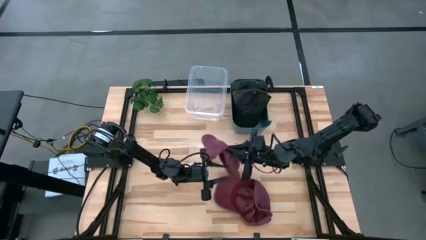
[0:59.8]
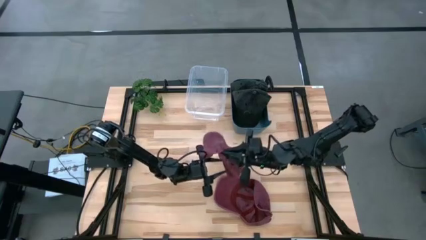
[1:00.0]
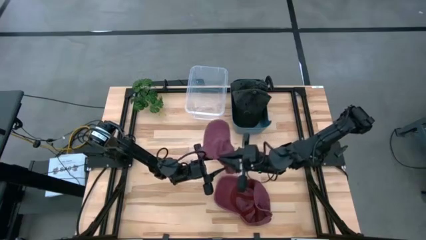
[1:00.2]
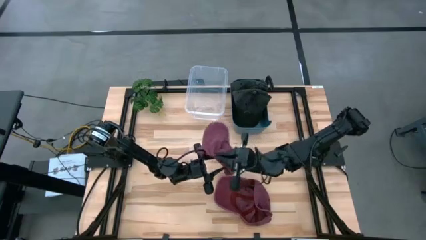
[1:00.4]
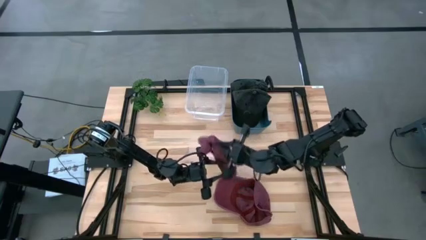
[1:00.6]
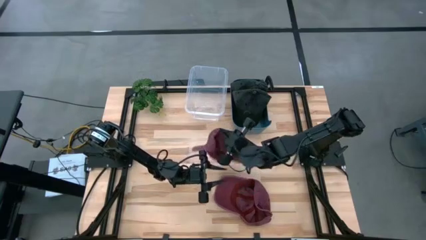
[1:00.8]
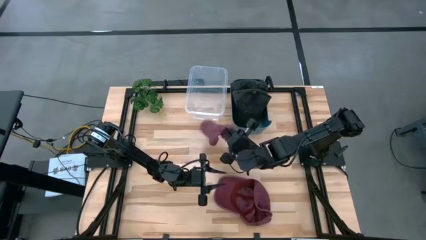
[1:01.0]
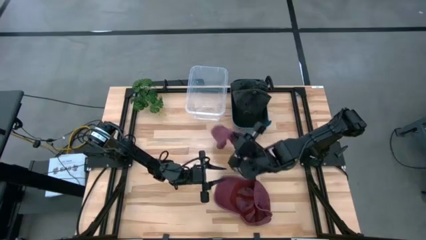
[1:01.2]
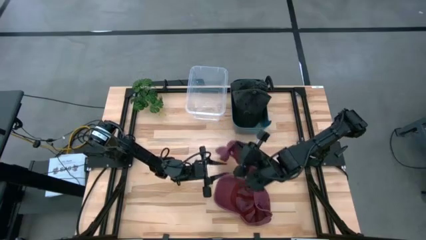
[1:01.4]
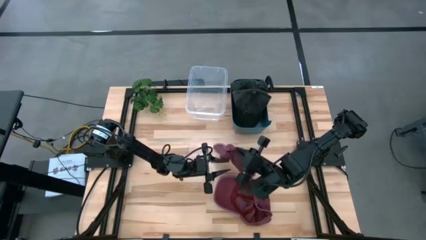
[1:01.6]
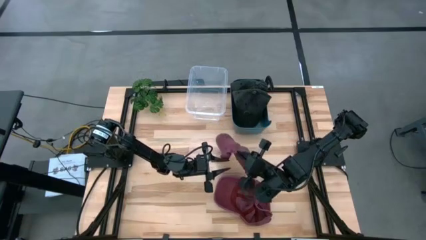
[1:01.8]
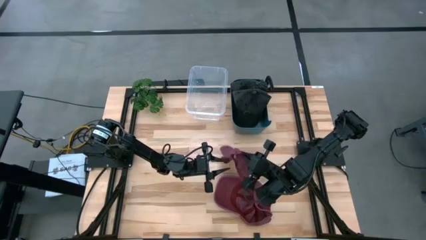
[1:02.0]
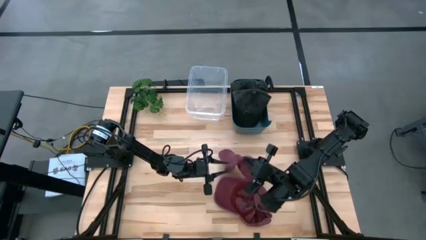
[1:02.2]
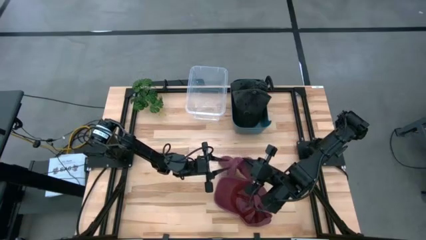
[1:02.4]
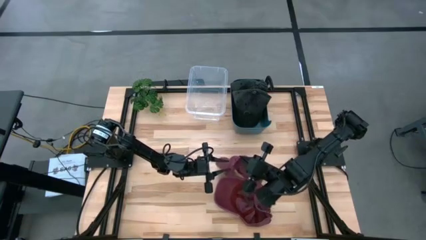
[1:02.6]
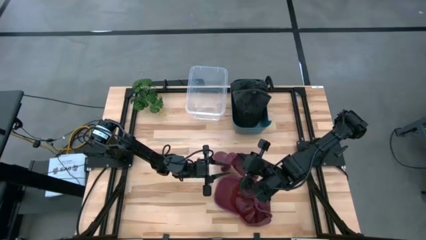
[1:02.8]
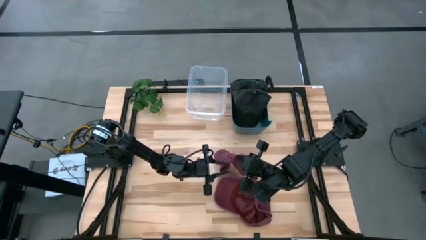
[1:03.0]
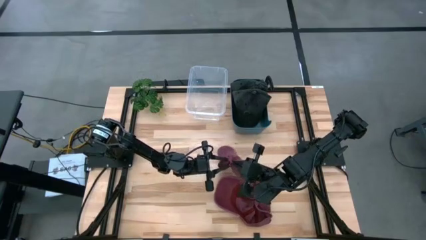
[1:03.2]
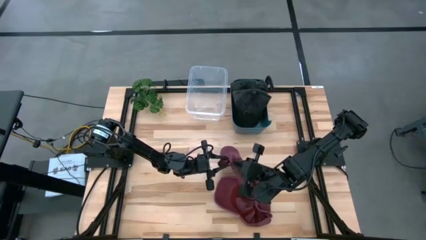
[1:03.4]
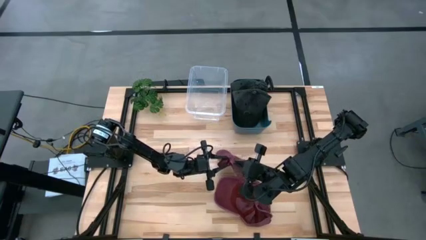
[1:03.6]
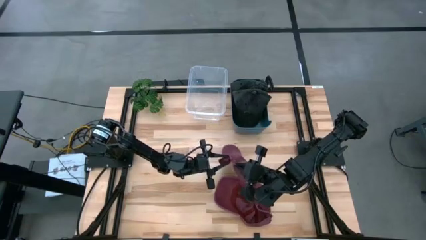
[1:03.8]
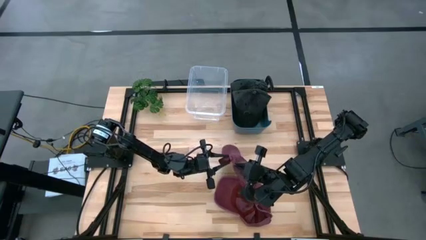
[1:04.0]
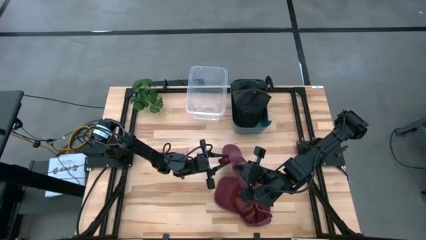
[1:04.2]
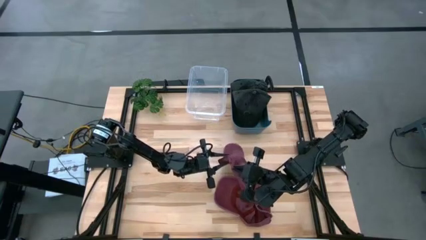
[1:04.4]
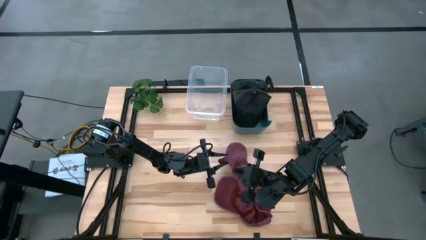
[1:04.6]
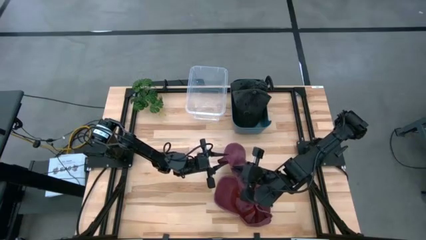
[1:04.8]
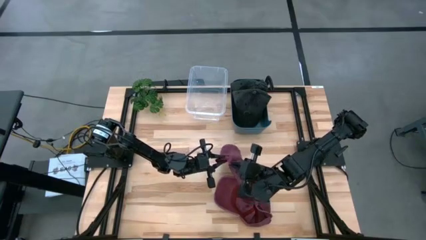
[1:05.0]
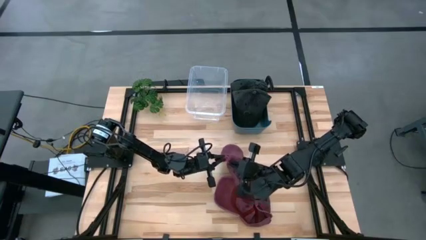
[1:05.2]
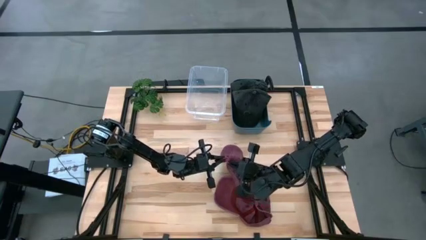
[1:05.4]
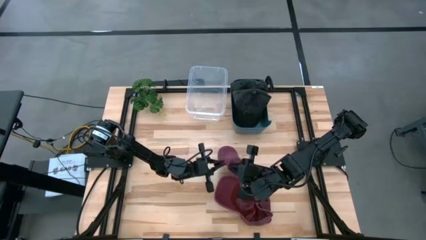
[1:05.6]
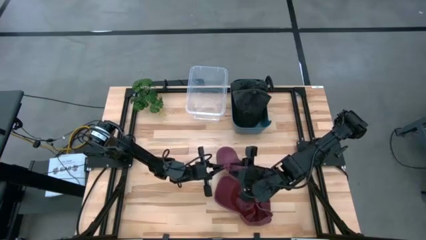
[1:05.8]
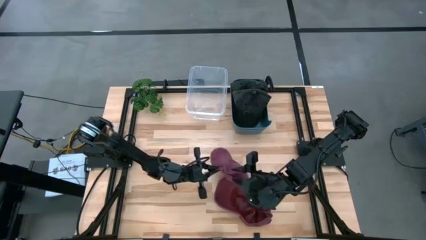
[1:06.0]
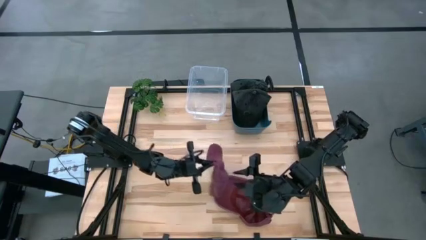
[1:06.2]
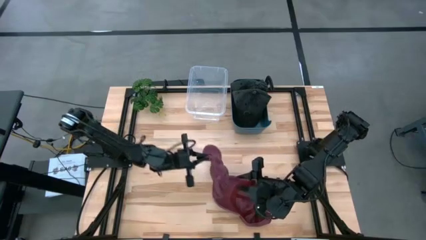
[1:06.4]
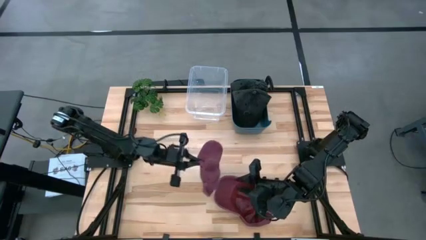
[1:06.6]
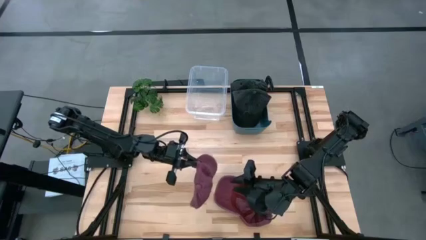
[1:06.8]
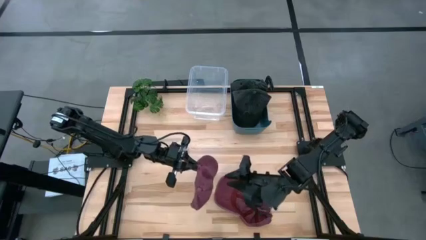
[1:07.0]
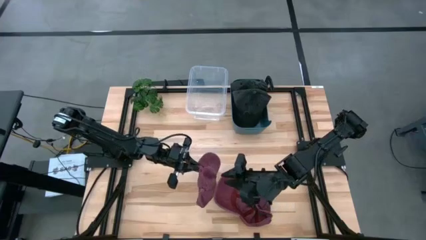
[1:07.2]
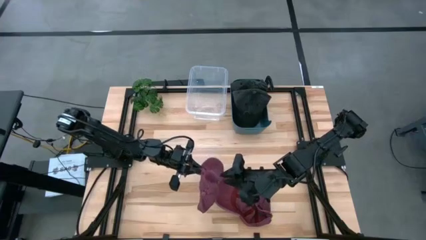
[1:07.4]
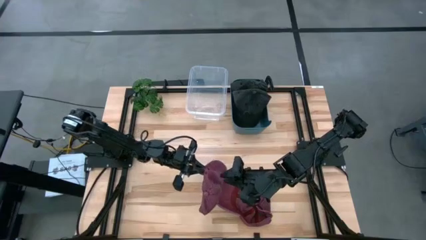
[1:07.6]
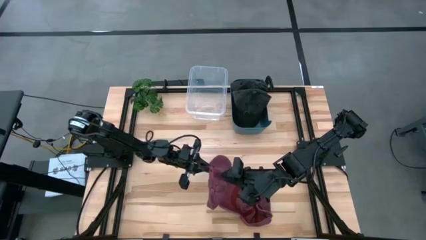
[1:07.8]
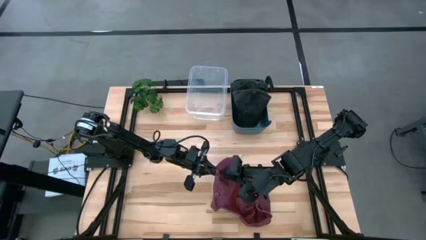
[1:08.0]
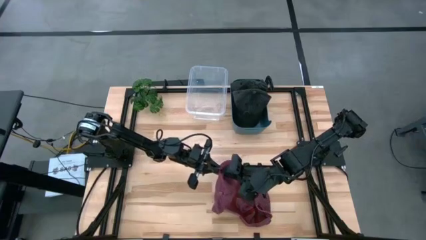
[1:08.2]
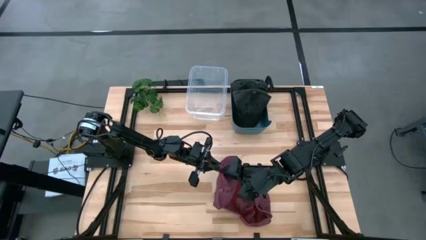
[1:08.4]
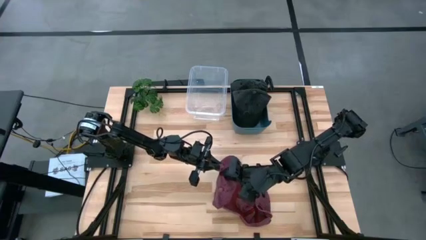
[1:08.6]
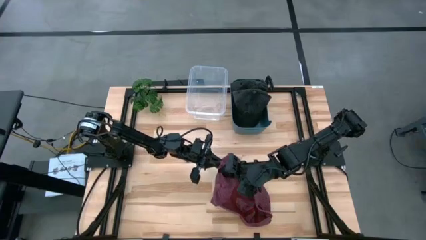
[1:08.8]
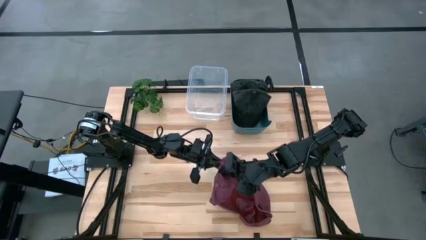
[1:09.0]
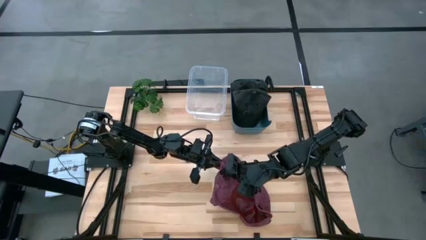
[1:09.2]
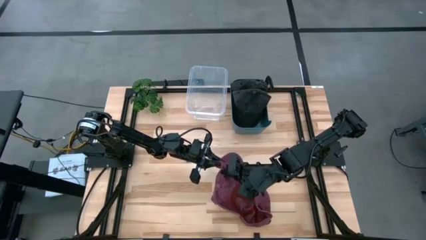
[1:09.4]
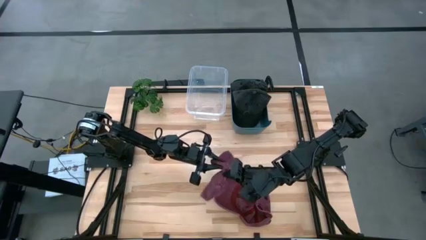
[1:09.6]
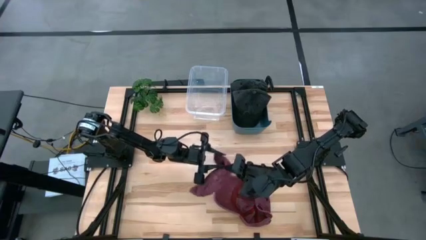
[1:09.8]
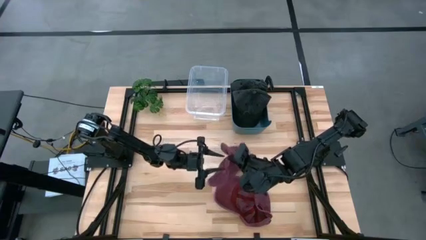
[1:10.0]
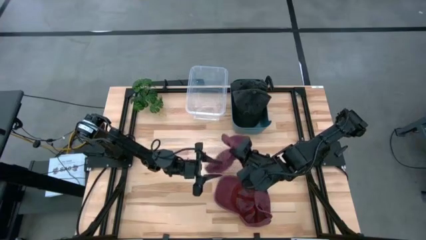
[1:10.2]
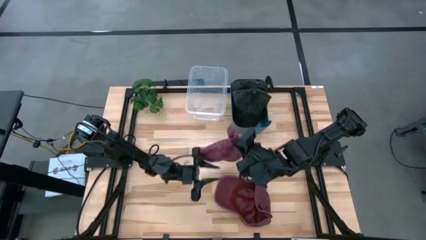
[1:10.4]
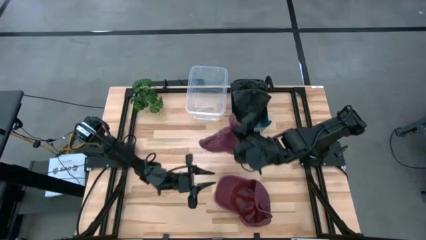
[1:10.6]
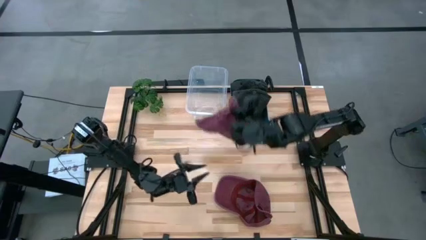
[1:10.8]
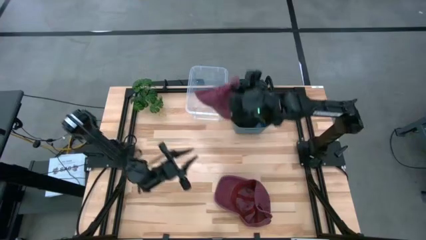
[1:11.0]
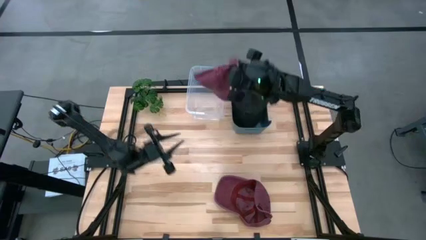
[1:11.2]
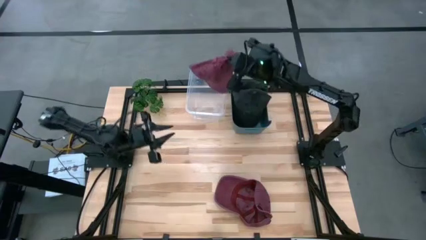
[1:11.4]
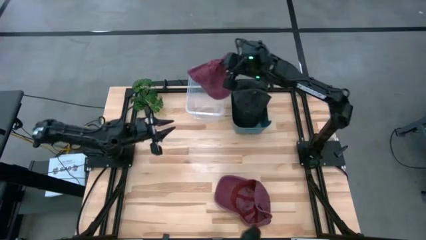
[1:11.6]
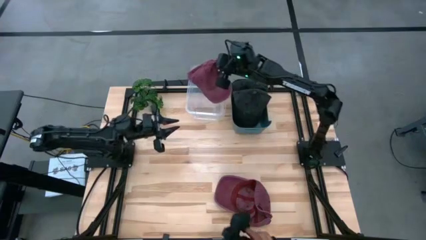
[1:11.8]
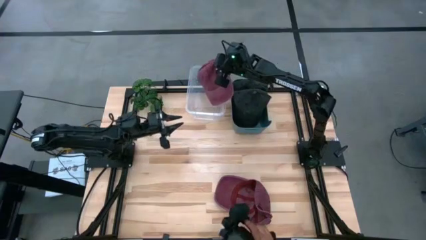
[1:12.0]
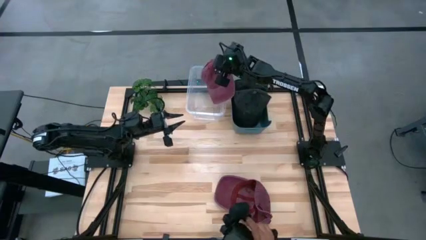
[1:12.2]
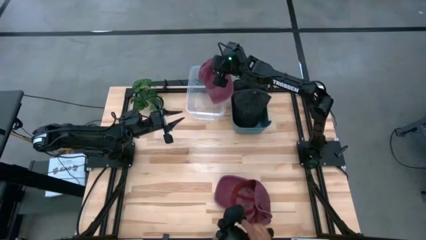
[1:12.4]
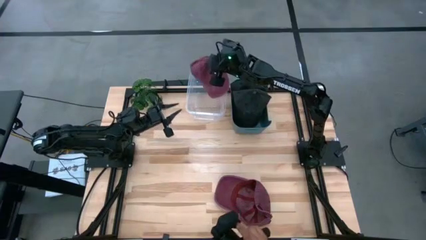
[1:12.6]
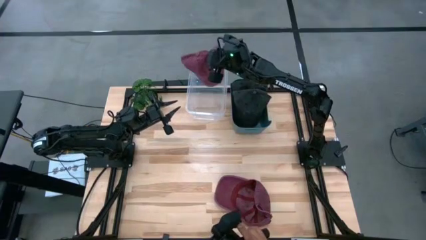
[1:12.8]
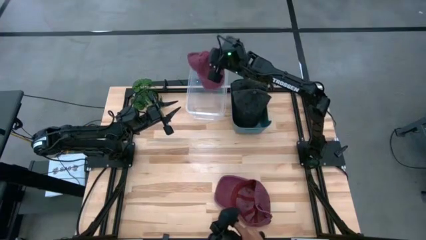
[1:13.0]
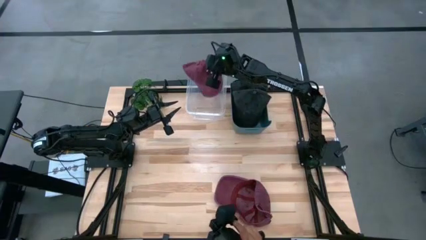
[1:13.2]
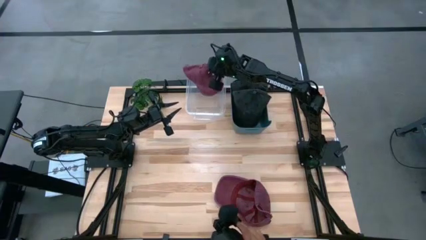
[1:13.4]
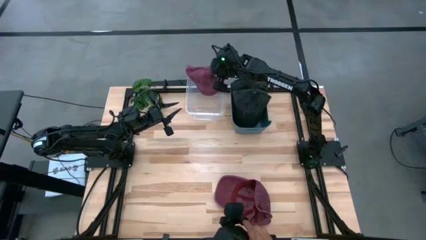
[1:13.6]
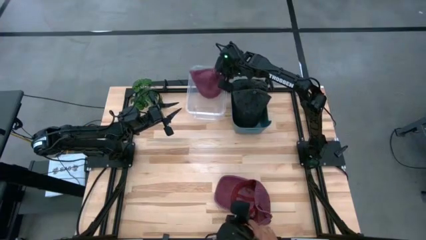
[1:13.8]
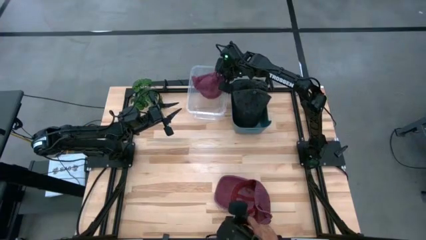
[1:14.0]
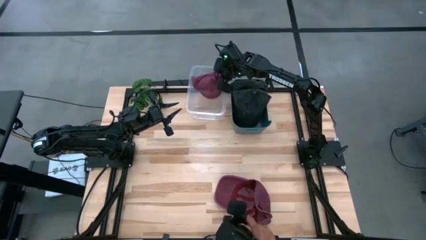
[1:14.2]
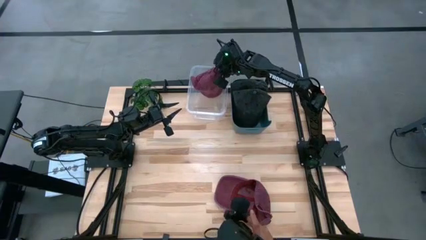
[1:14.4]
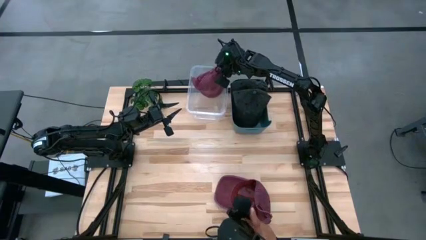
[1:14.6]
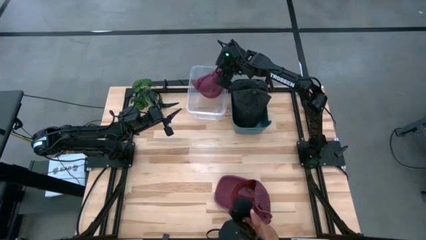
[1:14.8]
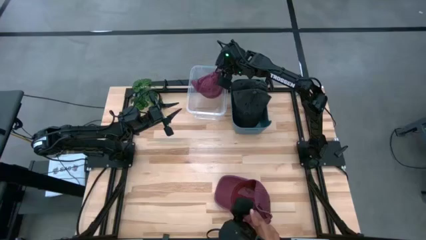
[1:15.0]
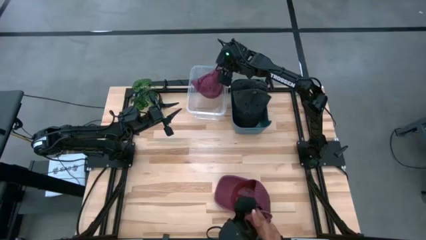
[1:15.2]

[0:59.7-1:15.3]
Task: Pick & Place hat
Put the left red cap into the transparent bin
